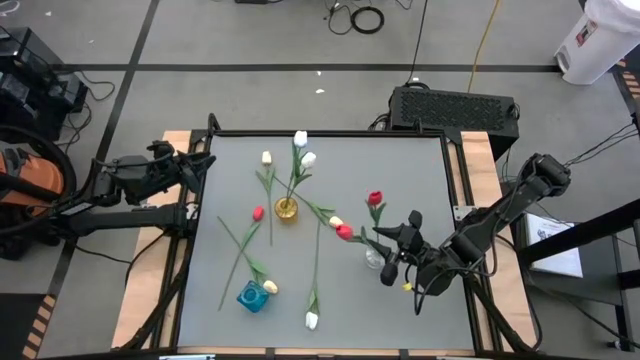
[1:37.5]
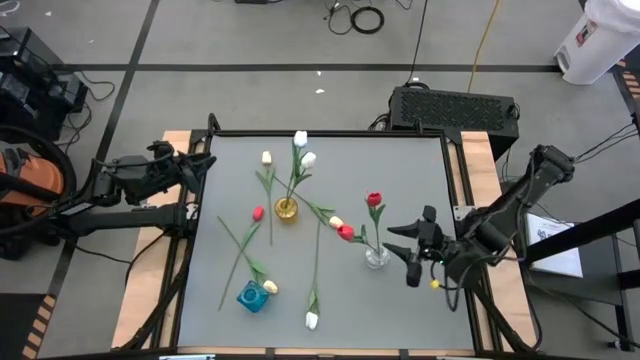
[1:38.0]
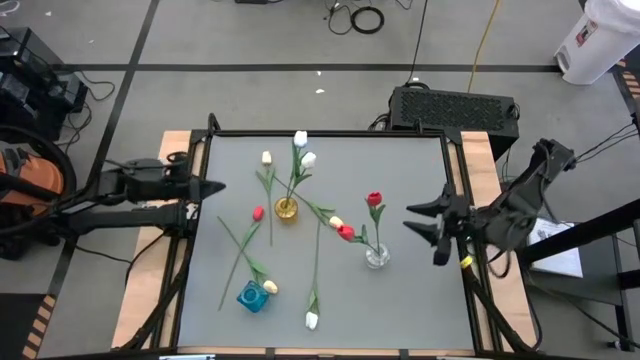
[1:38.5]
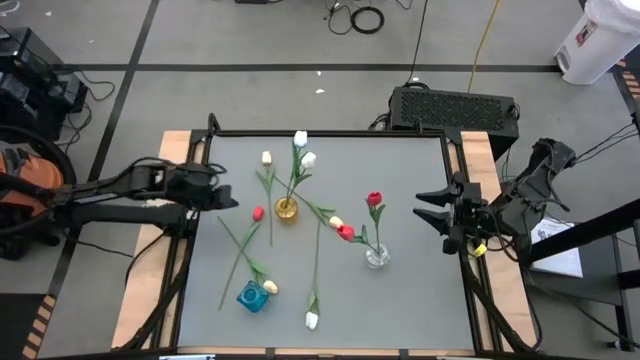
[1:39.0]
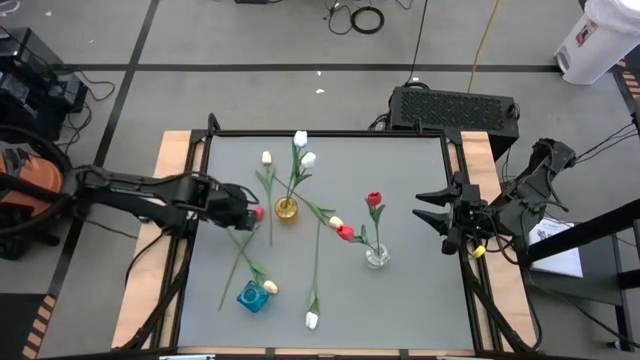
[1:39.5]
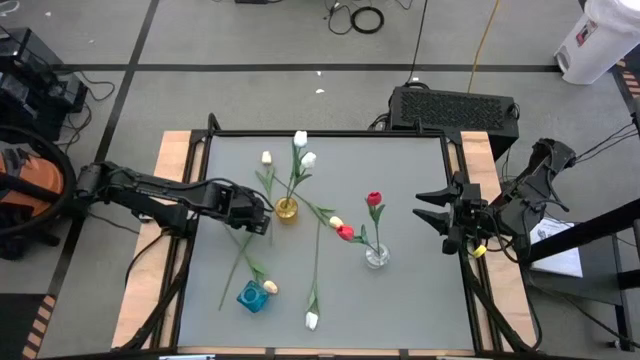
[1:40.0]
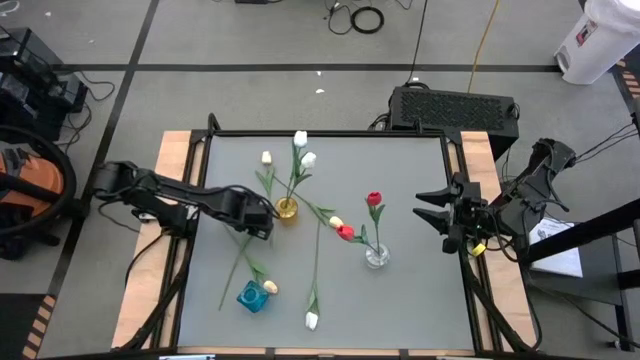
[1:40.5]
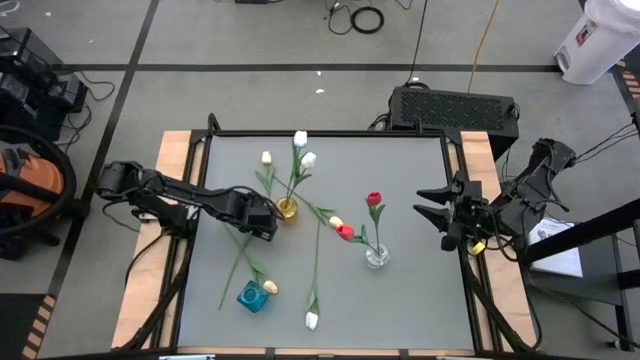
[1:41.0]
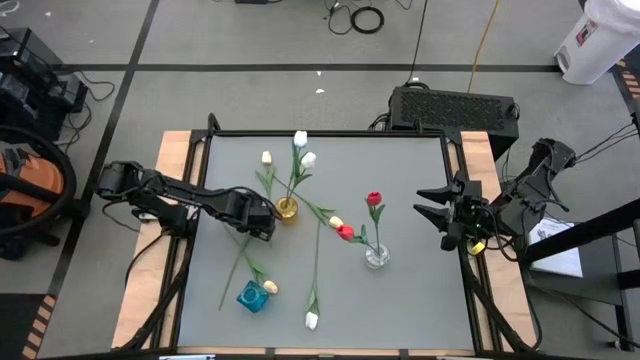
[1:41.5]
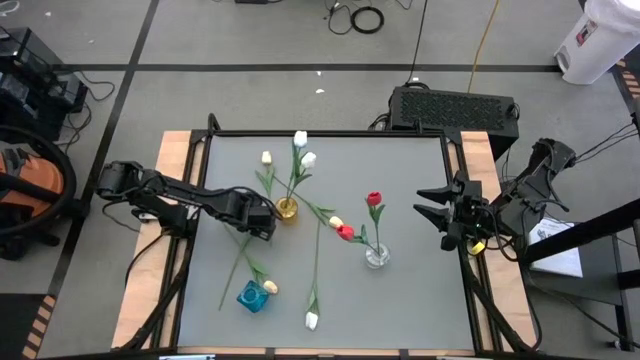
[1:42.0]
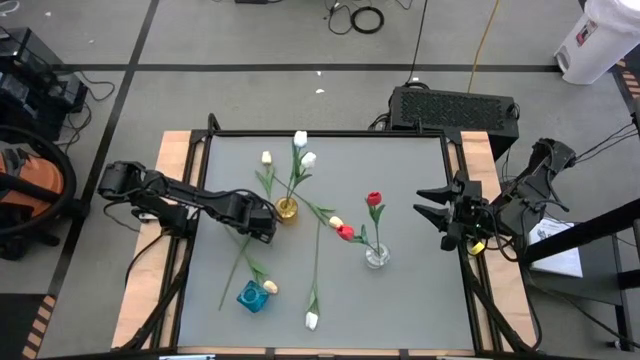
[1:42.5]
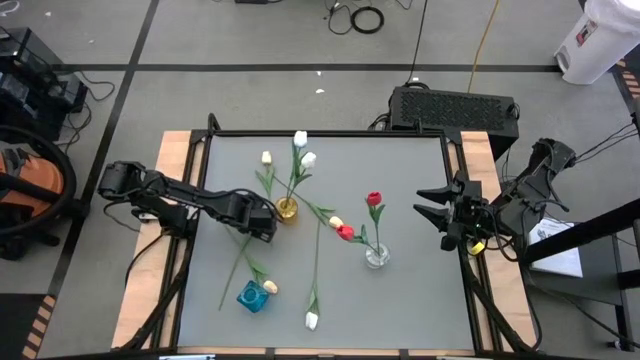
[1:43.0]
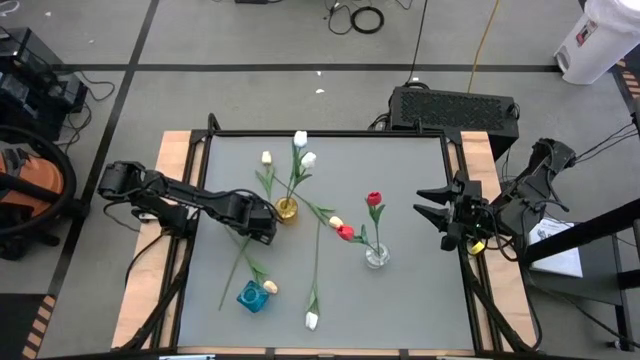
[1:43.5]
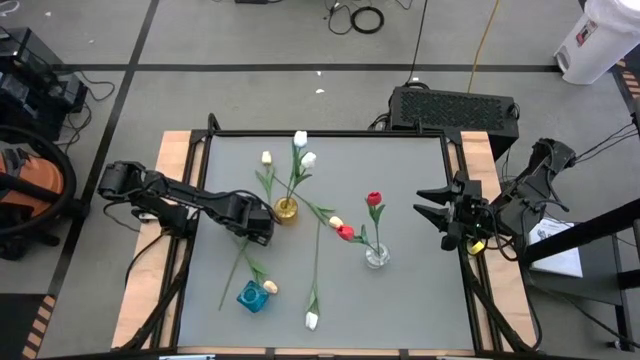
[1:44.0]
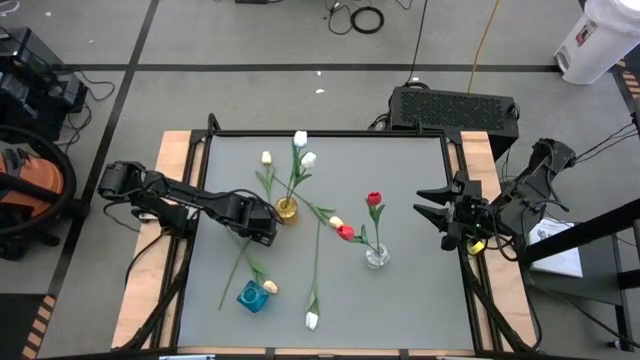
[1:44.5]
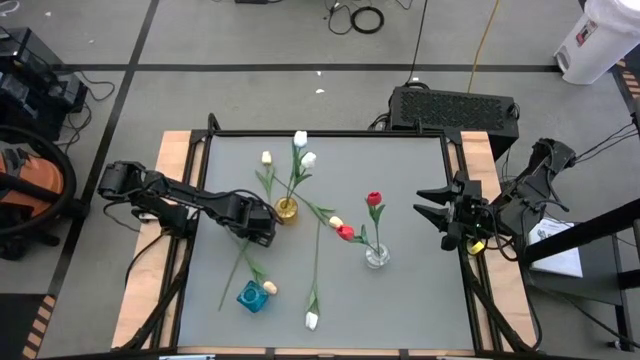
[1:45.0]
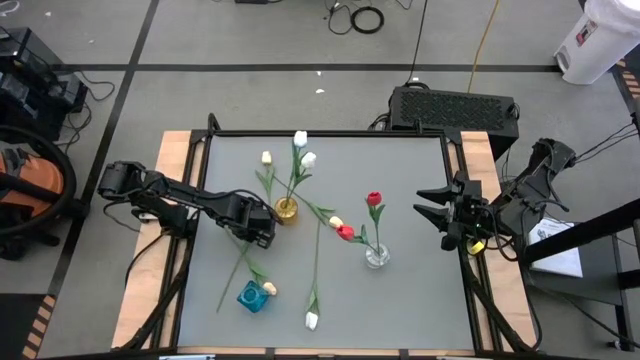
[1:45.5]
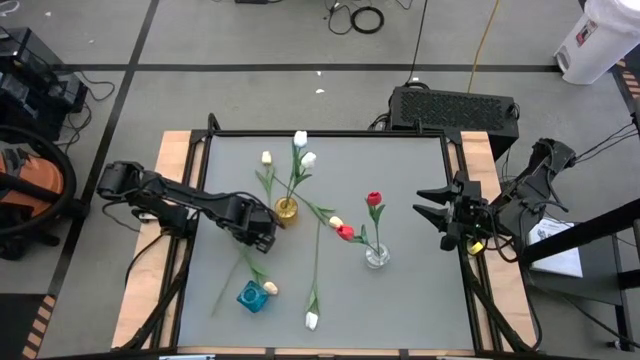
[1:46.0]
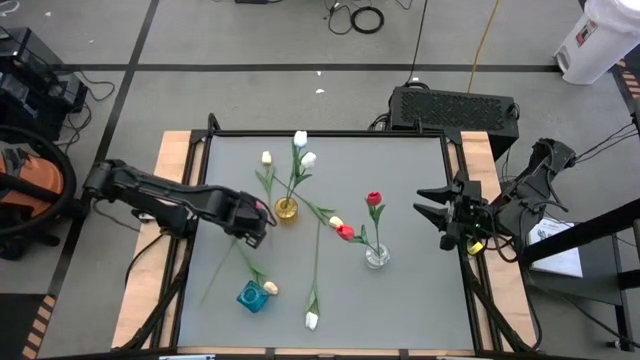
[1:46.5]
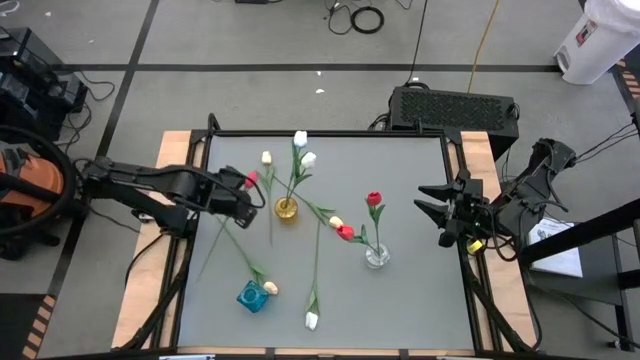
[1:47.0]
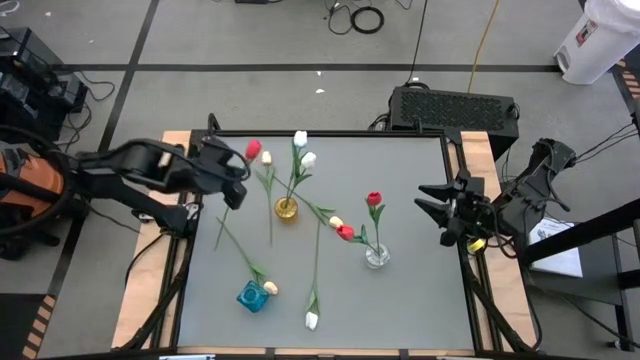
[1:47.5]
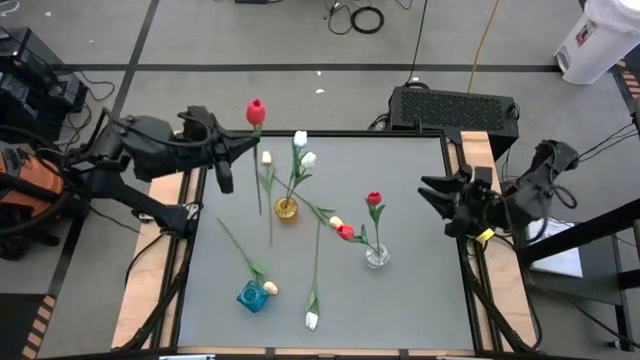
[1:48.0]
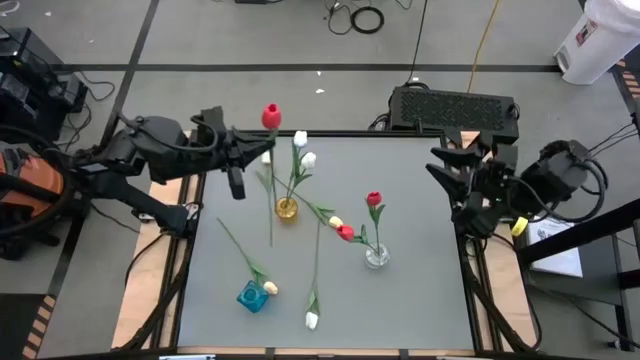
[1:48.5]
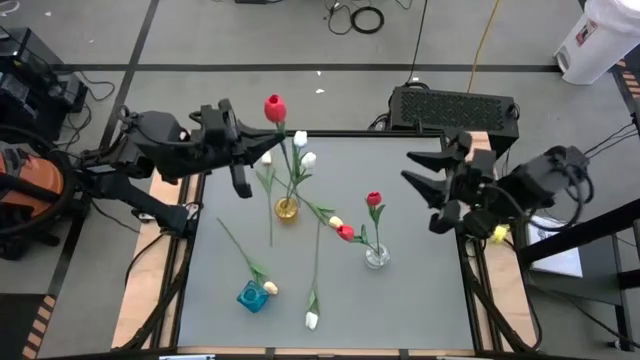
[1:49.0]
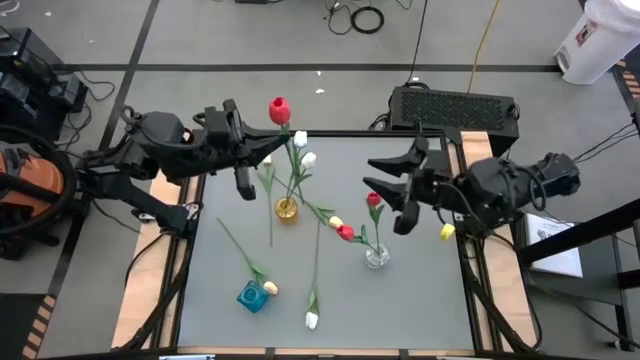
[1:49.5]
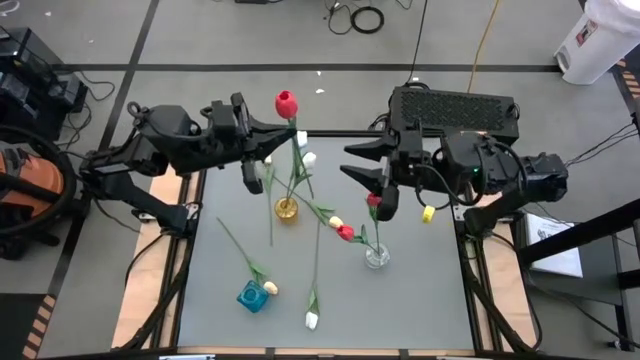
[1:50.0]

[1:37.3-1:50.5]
Task: Sort flowers into vase by color
Put the red tulip into the transparent vase

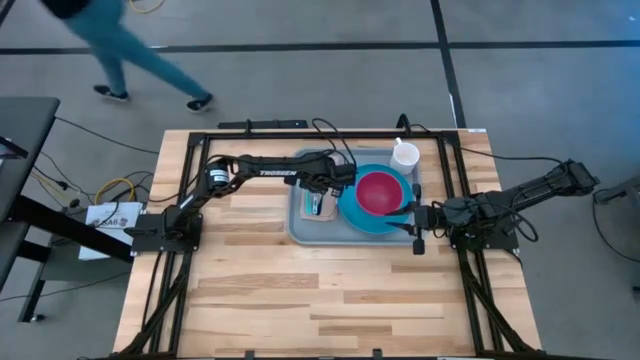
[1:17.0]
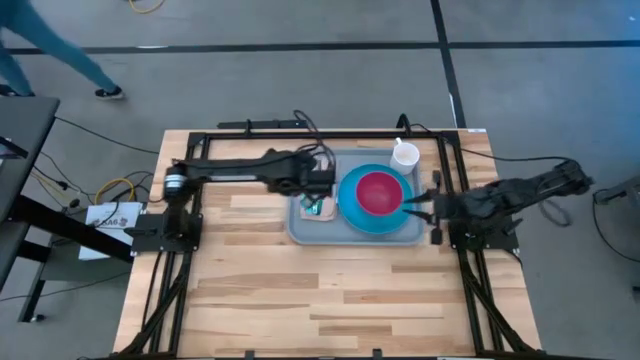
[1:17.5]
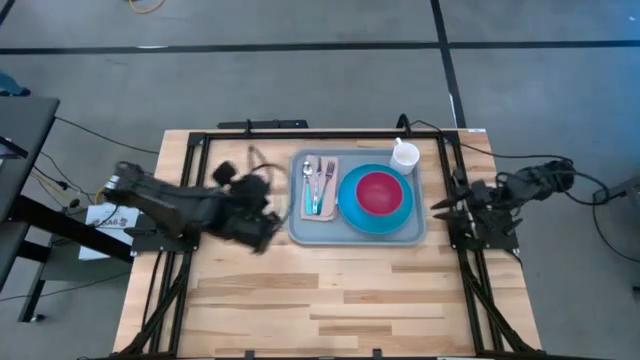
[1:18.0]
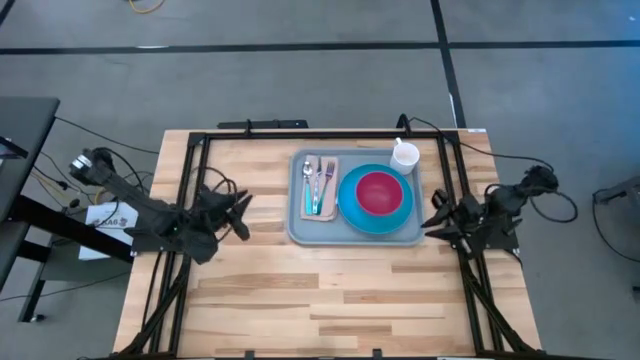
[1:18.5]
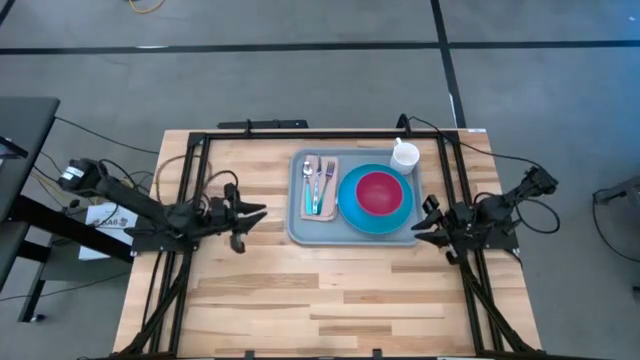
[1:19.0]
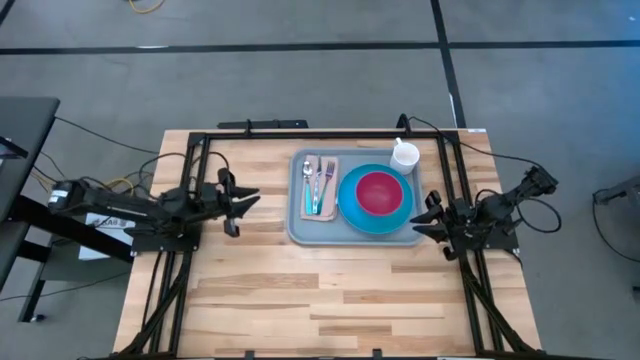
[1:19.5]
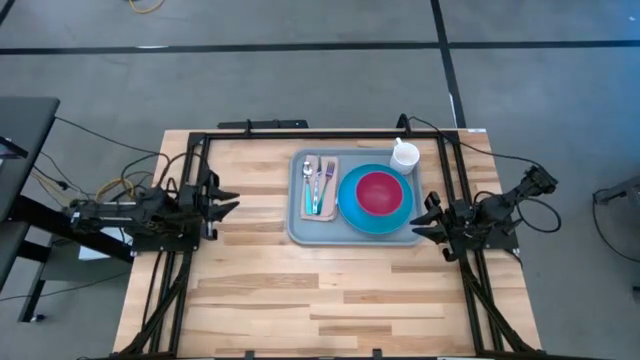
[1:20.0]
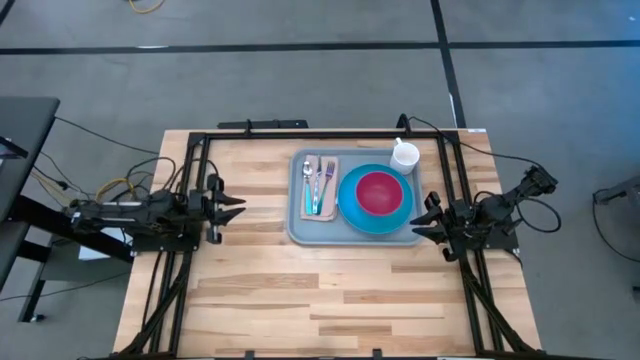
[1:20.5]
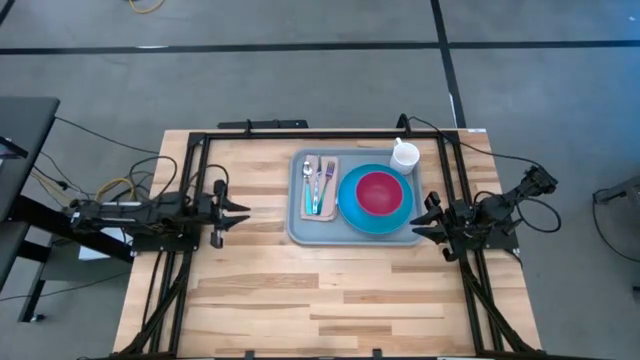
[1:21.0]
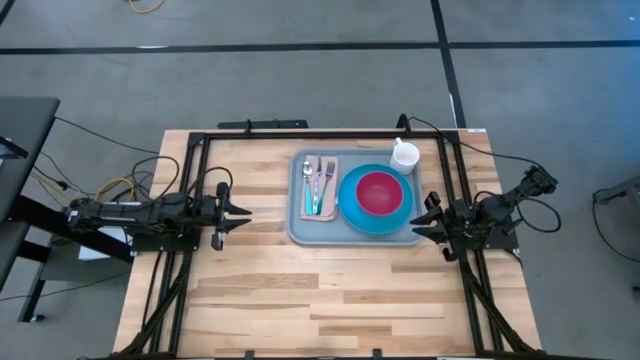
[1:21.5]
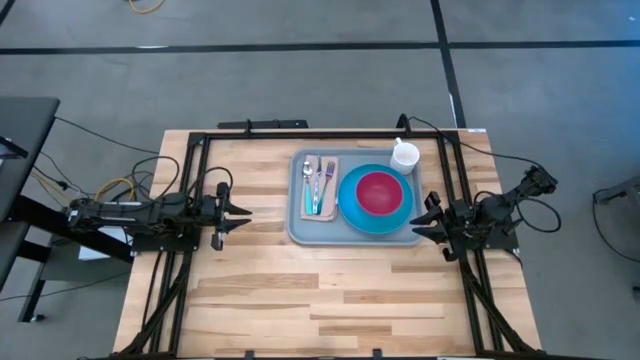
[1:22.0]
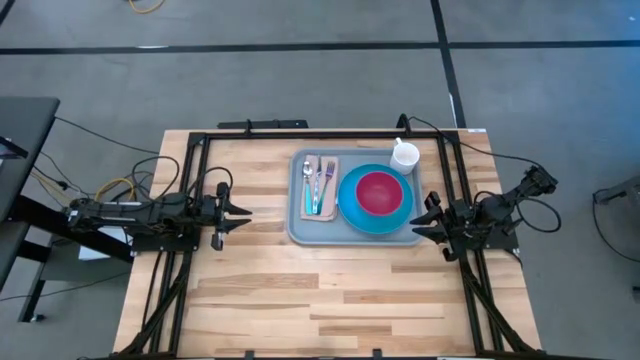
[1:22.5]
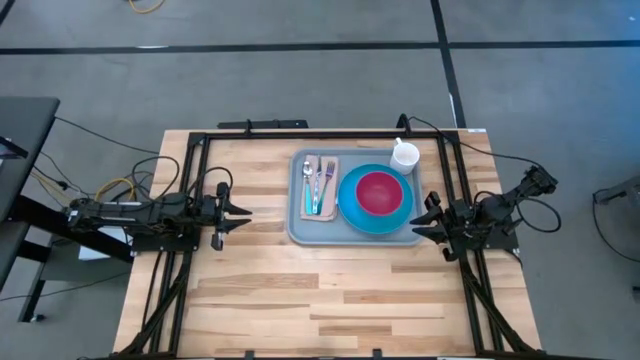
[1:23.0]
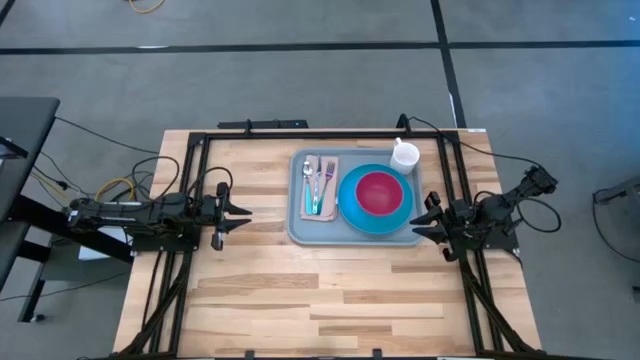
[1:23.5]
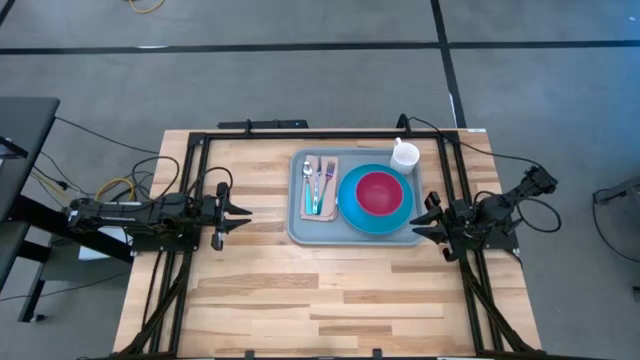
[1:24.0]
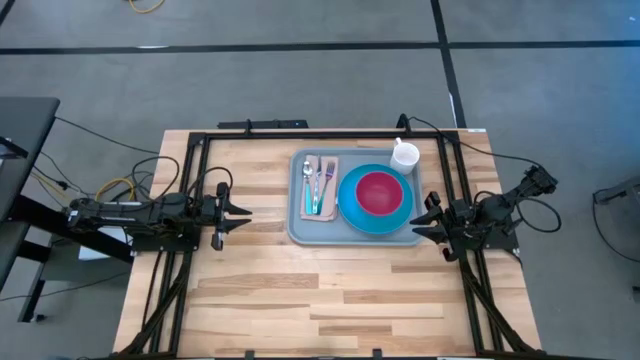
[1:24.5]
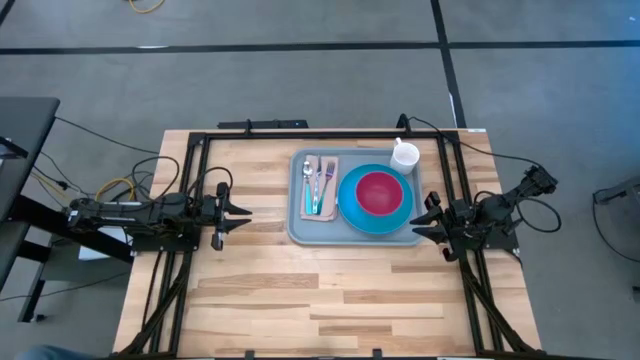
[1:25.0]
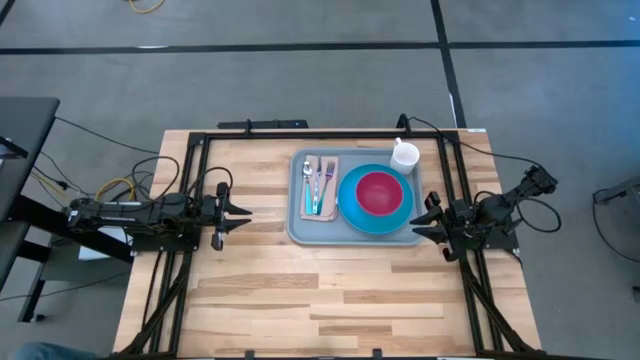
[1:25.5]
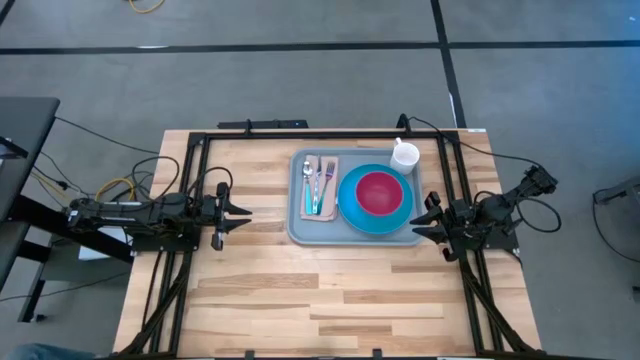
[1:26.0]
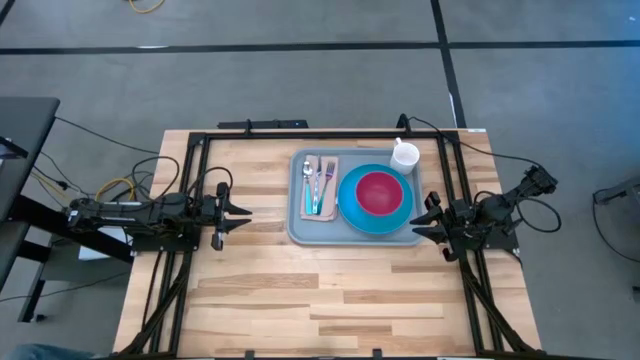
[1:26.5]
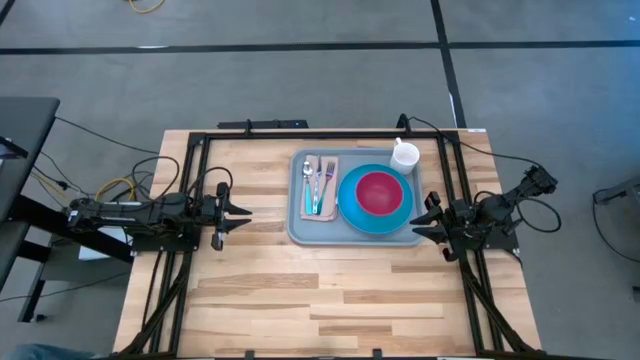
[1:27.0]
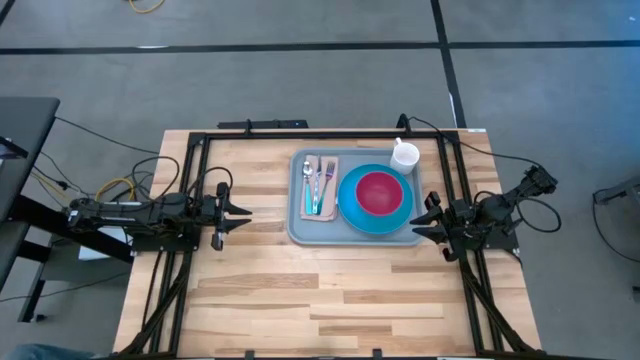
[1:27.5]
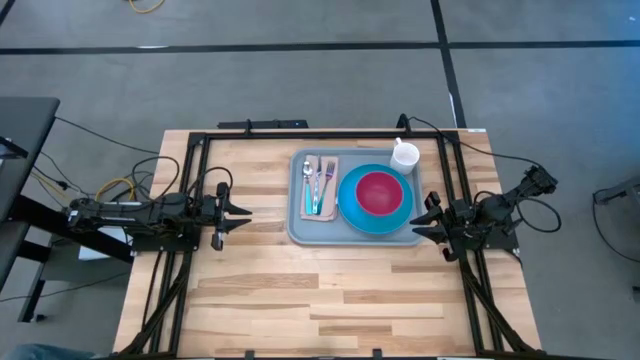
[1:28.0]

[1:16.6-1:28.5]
Task: Set up tray
Return to Home Position
